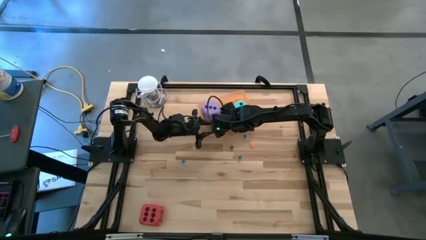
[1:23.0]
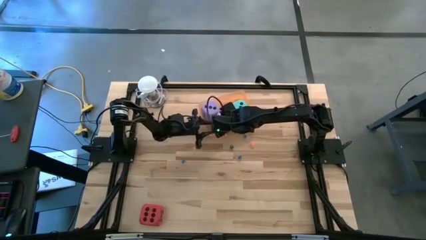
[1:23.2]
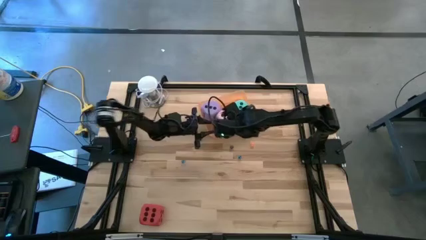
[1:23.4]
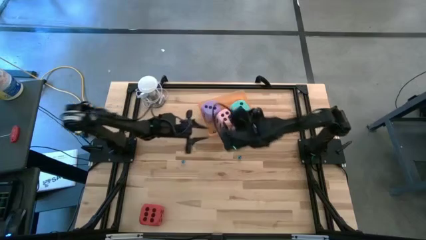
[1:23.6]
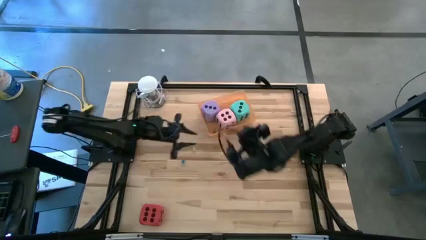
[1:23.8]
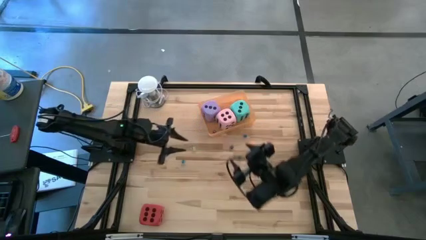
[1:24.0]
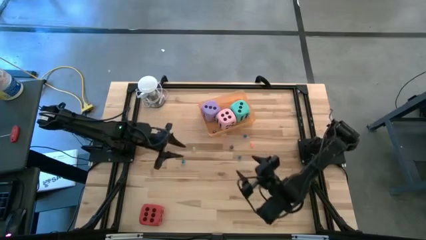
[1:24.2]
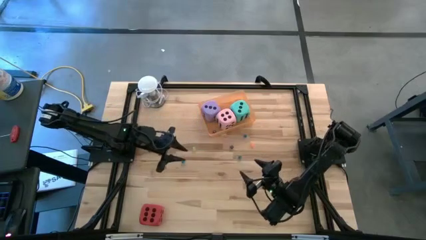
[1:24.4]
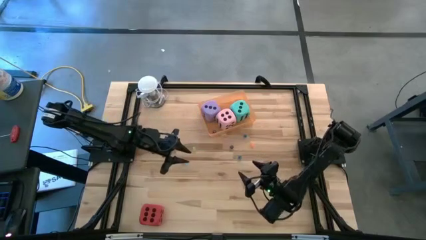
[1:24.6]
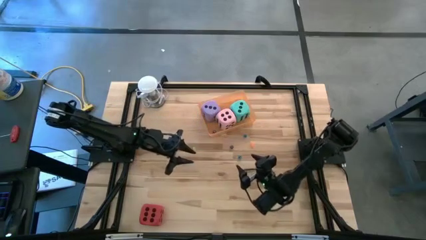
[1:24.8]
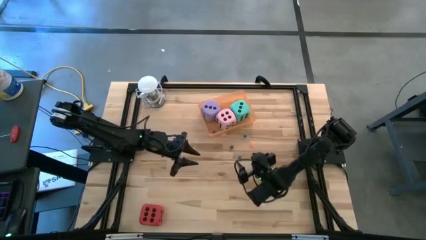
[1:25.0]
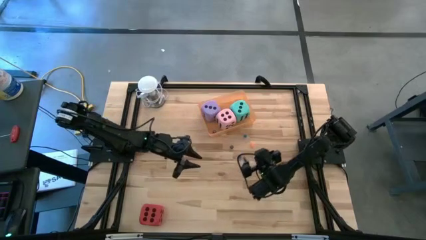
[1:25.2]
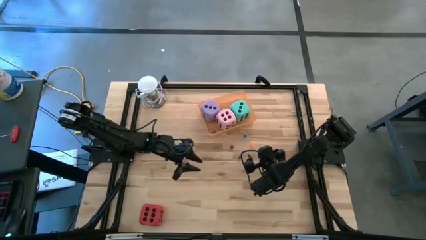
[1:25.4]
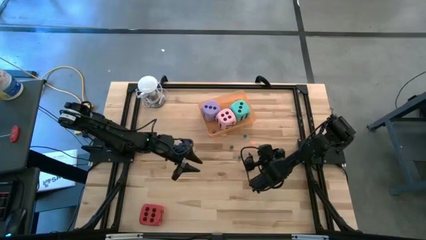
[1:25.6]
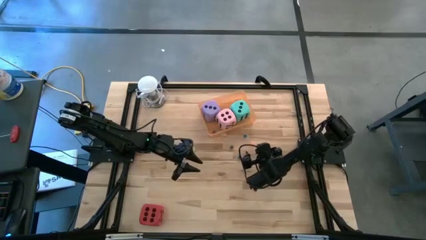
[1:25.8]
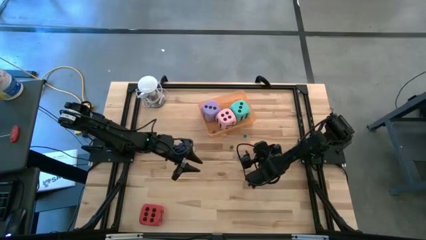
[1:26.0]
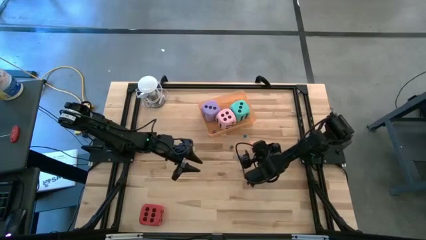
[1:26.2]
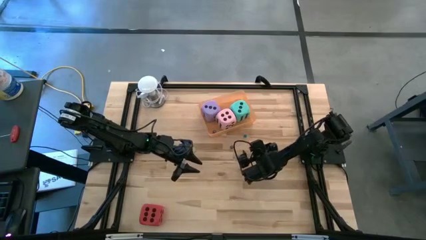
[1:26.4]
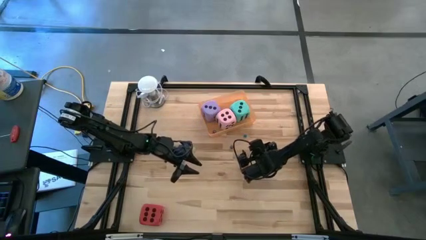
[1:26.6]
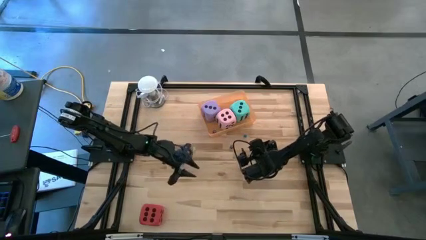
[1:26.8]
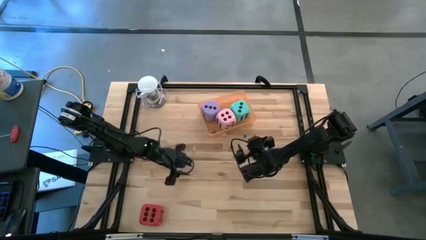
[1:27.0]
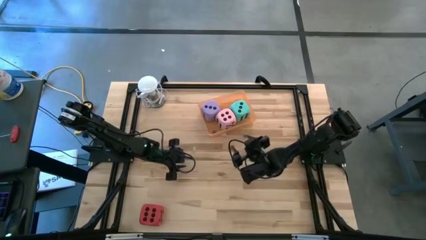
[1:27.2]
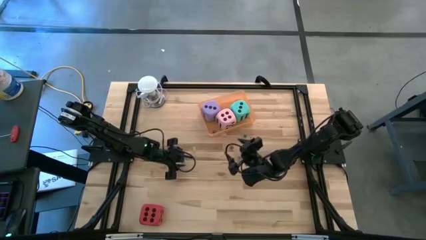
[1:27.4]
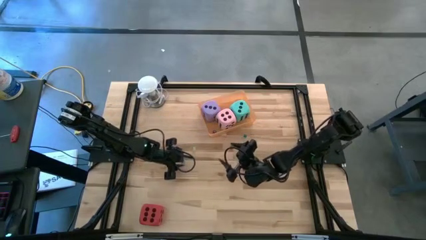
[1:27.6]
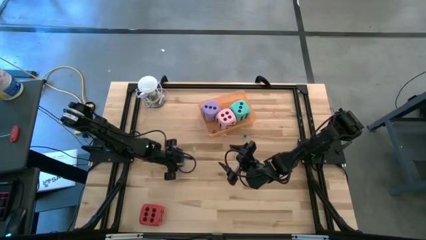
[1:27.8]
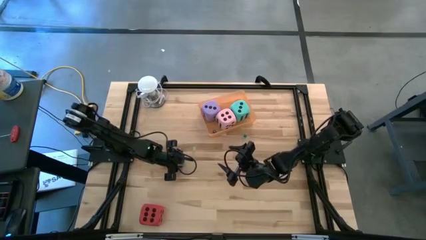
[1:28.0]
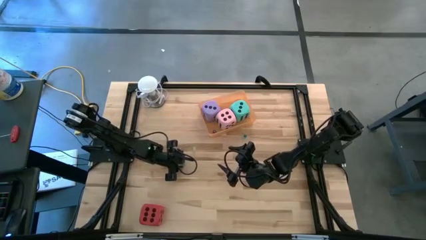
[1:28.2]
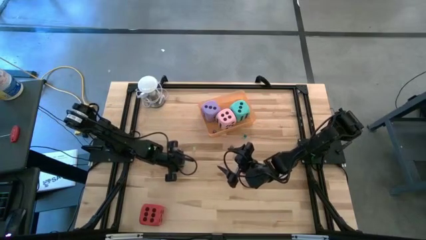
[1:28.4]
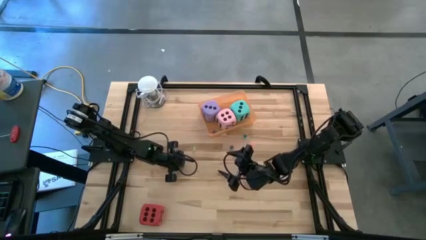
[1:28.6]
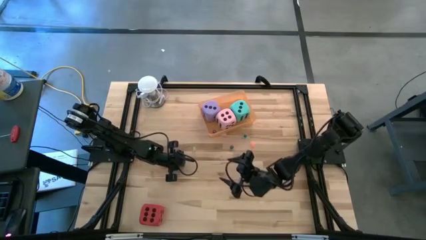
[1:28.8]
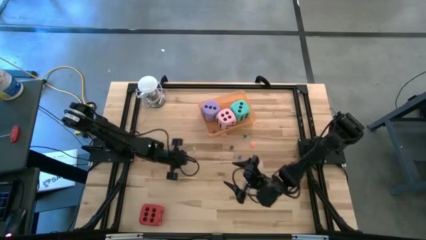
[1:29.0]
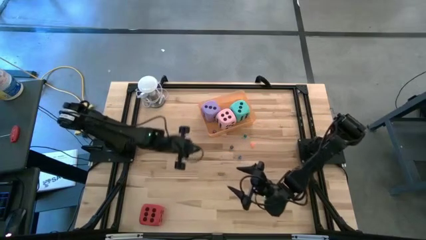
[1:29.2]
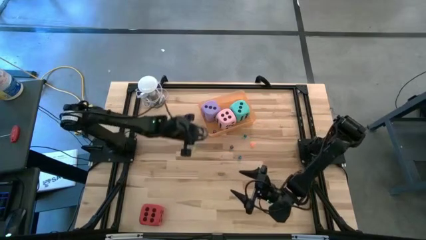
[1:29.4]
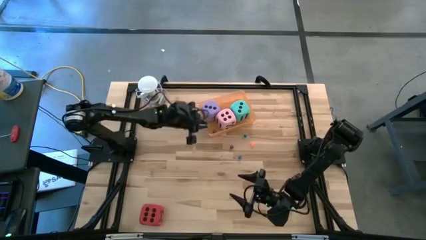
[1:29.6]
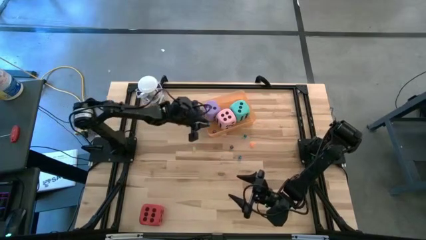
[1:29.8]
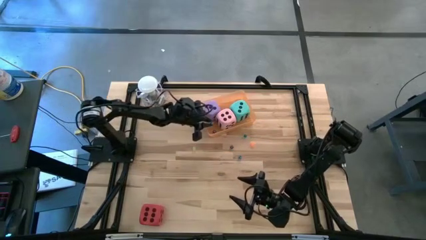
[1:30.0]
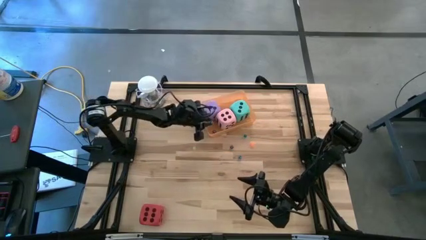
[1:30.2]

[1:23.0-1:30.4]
Task: Pick & Place Dice
Put the small light blue die into the orange bin

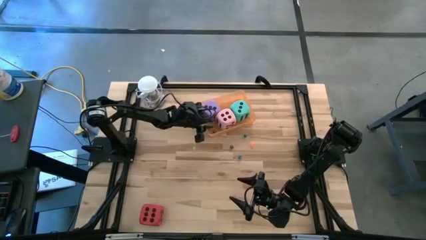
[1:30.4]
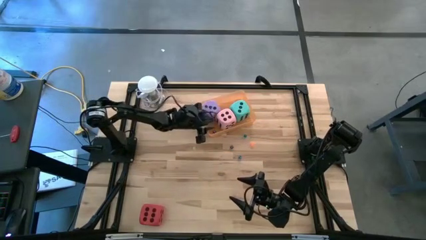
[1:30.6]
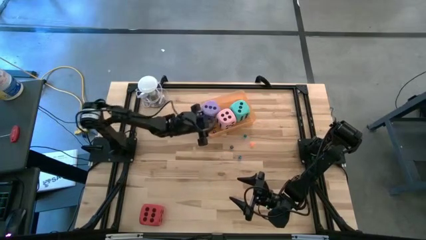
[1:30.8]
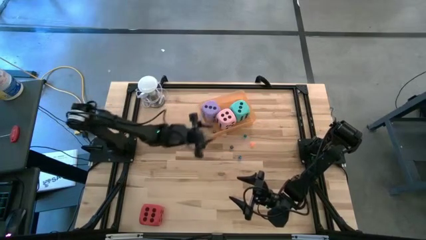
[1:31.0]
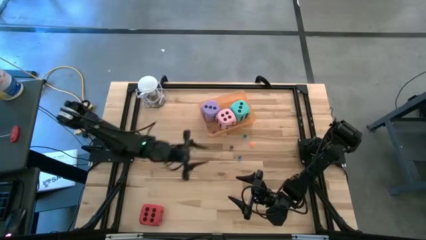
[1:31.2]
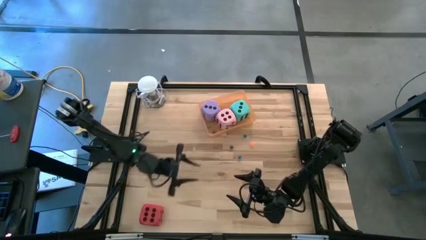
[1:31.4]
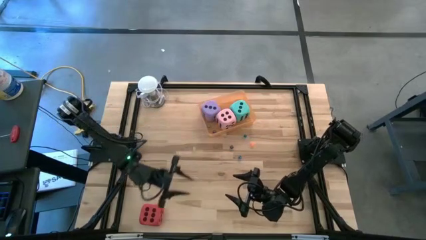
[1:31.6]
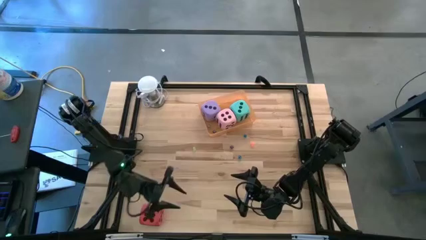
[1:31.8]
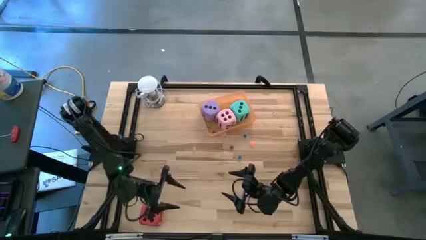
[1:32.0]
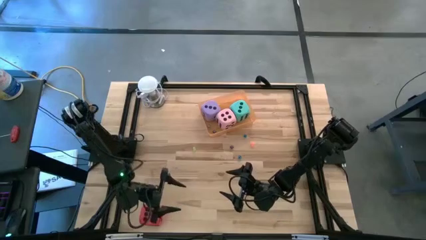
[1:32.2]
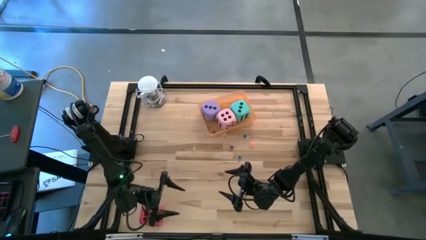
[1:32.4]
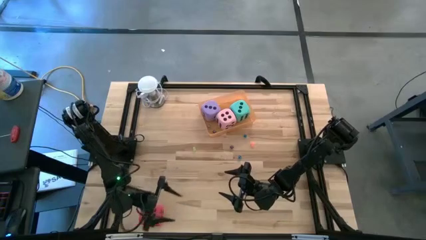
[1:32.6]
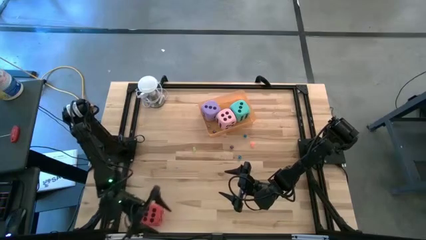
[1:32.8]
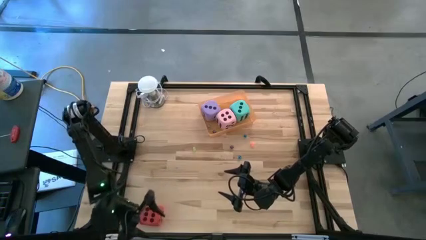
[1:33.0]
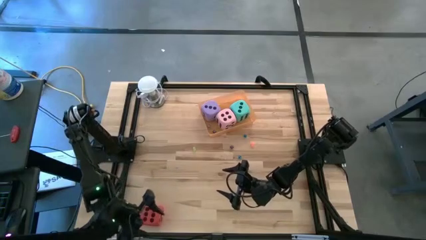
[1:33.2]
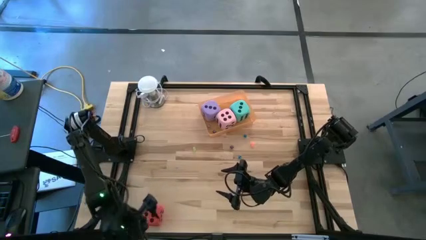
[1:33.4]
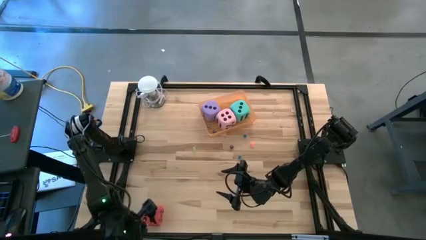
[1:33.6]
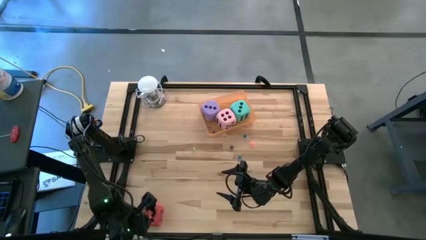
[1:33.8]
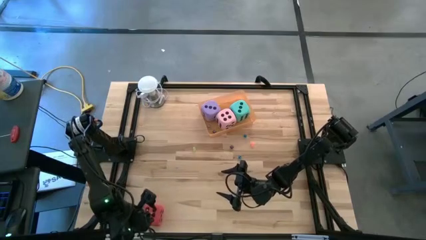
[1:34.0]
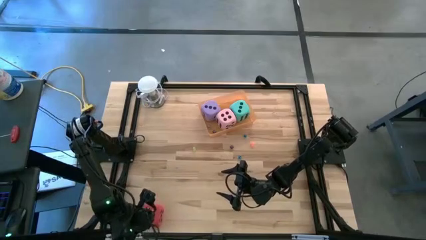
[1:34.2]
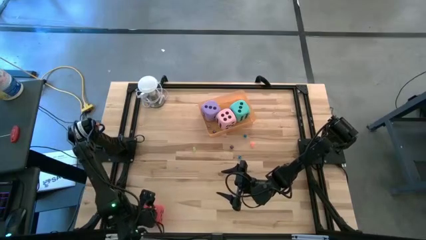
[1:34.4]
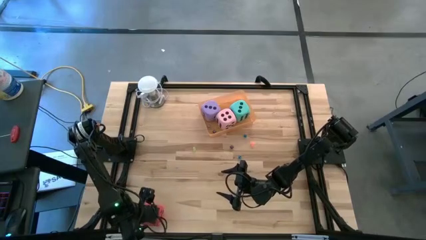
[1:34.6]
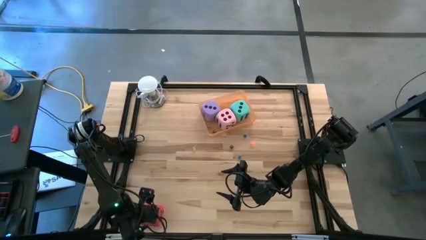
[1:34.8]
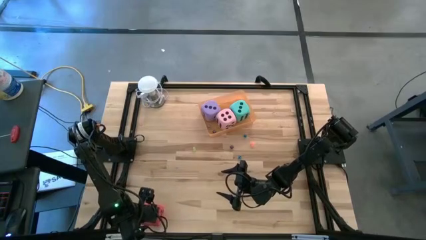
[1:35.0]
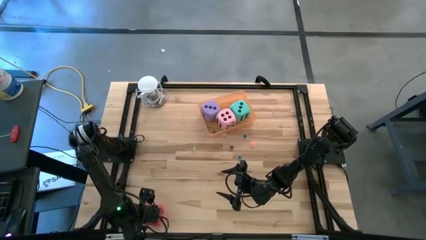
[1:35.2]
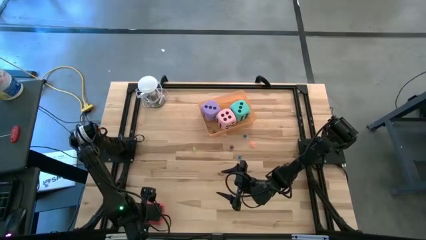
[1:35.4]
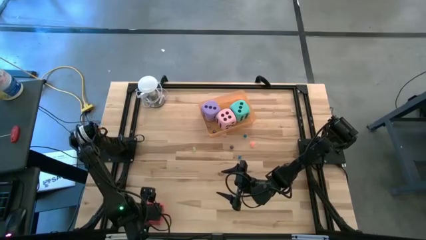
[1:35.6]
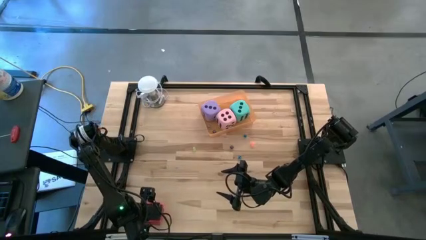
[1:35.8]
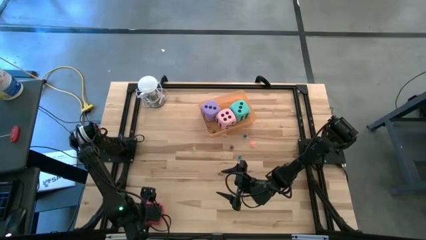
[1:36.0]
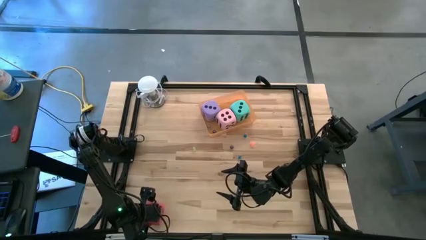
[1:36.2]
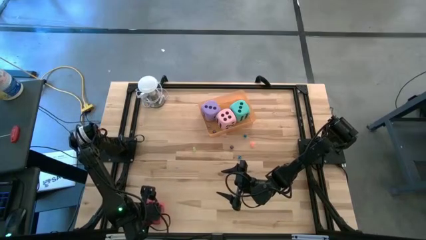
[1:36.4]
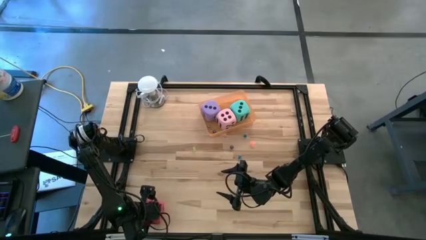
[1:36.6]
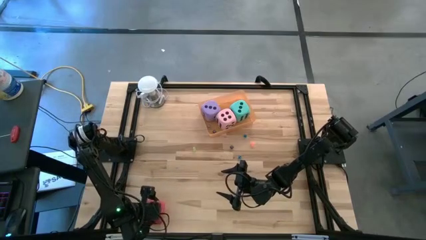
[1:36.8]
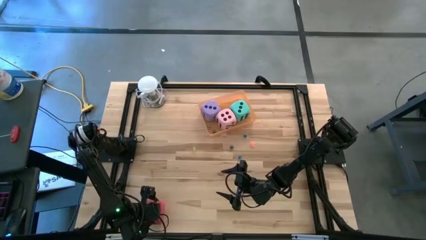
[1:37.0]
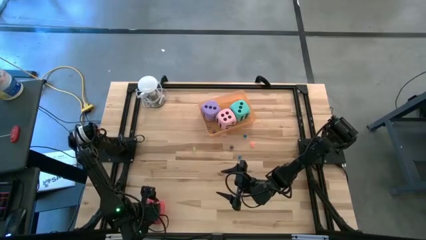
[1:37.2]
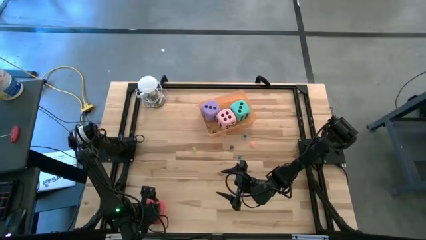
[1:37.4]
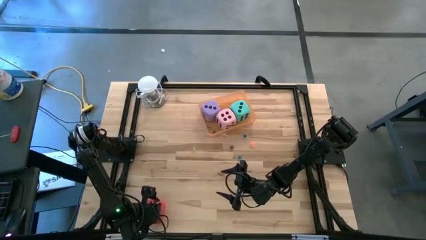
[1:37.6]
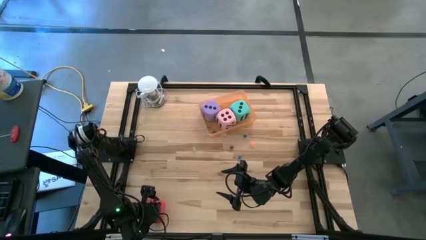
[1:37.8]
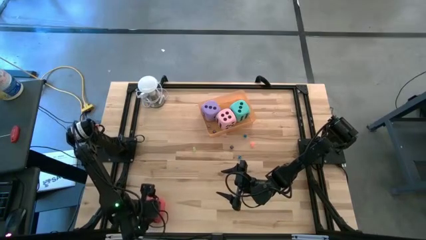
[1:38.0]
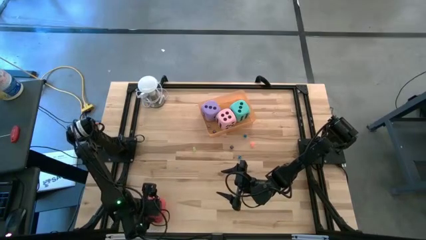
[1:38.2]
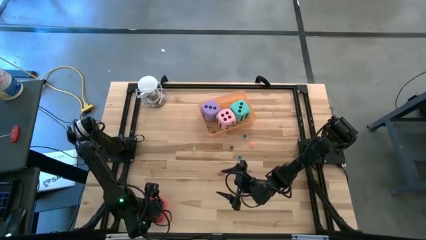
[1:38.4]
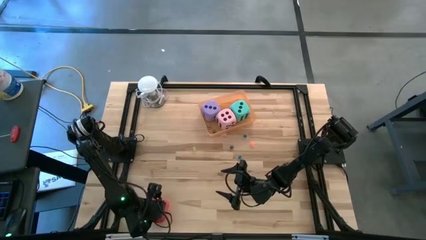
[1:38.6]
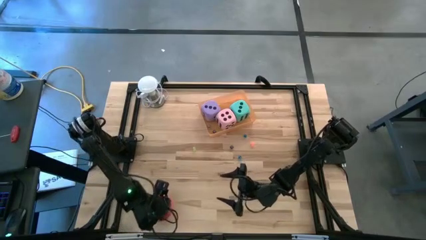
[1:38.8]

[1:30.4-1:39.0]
Put the big red die into the orange bin
